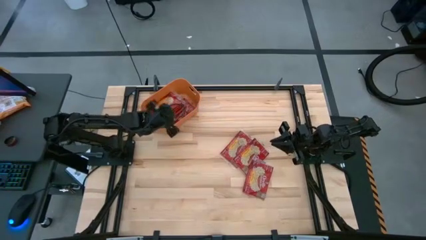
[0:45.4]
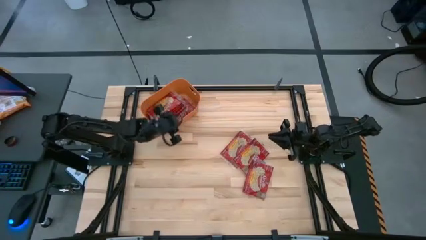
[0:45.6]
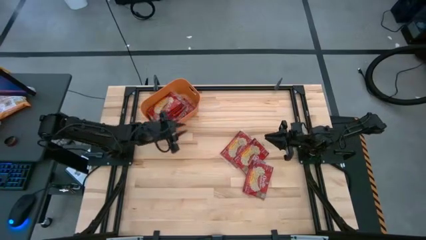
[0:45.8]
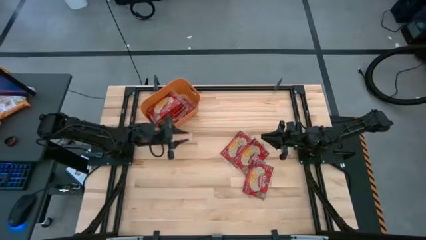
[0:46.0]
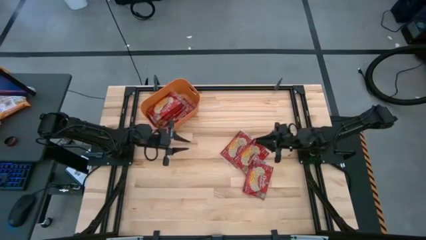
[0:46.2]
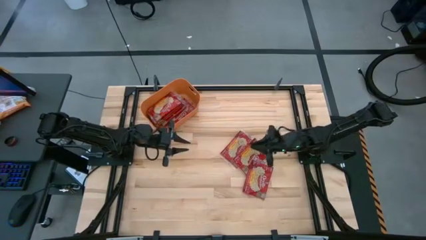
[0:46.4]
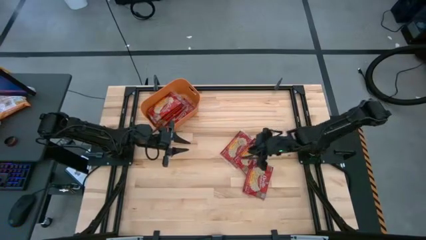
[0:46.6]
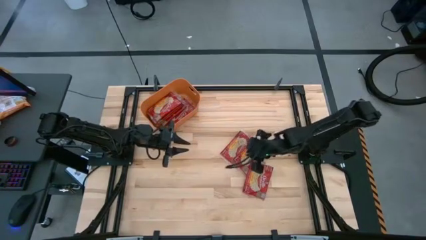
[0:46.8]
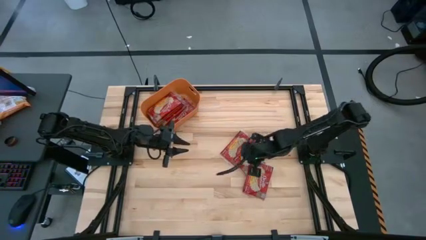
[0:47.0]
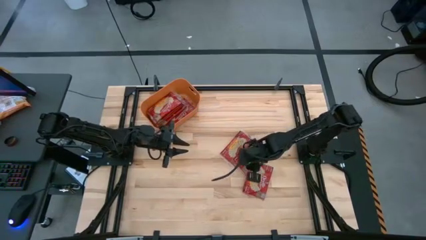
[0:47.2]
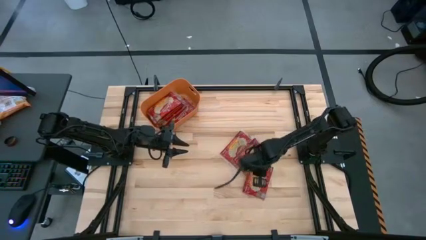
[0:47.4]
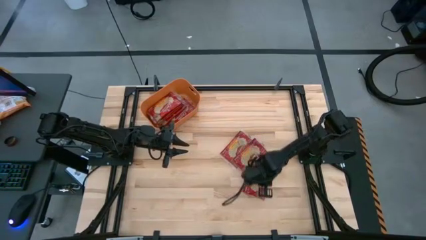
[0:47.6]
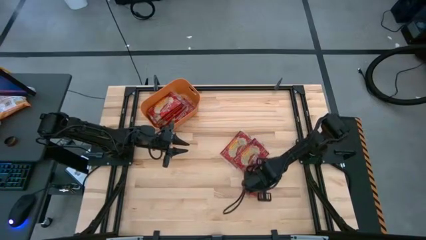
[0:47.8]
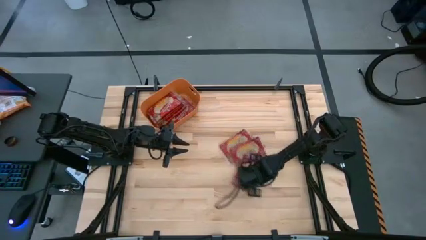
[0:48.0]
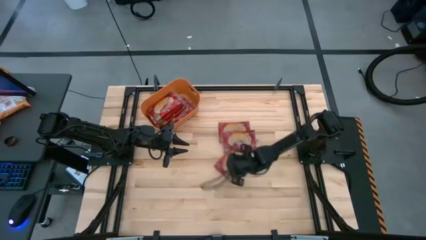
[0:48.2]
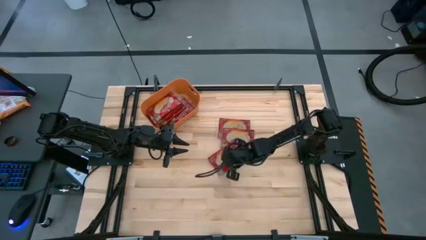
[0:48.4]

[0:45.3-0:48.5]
Task: Sort popcorn bags into baskets
Put the red popcorn pack into the orange bin

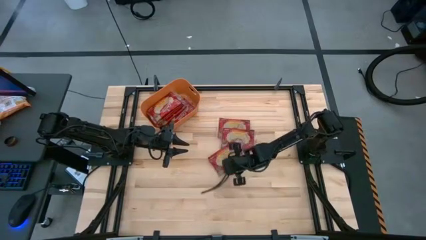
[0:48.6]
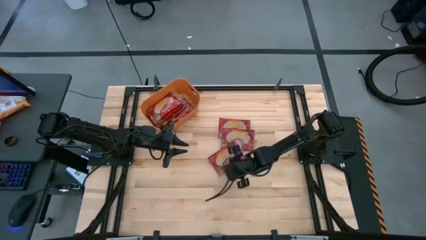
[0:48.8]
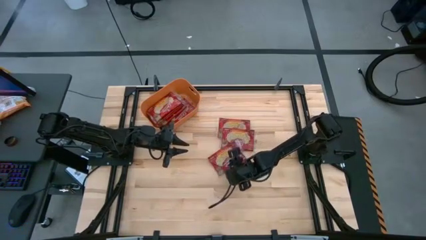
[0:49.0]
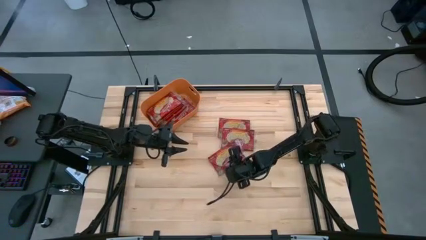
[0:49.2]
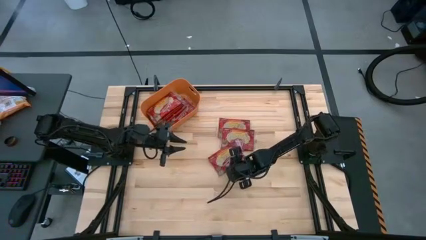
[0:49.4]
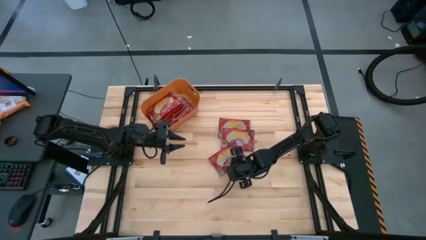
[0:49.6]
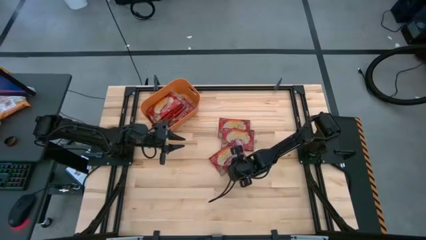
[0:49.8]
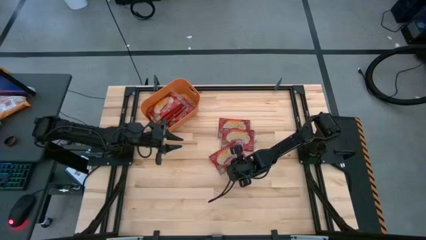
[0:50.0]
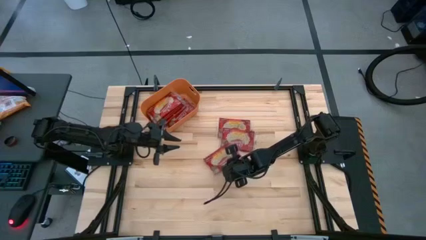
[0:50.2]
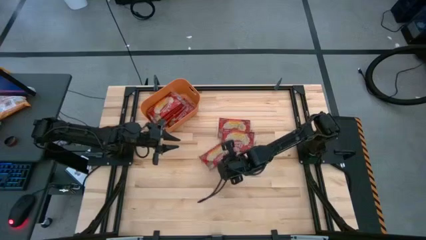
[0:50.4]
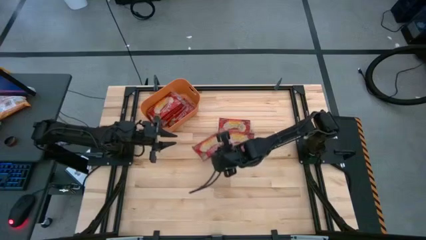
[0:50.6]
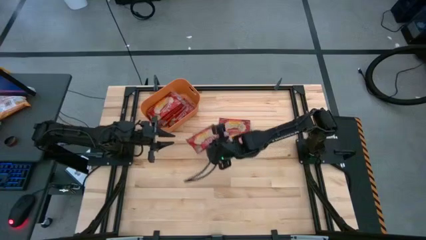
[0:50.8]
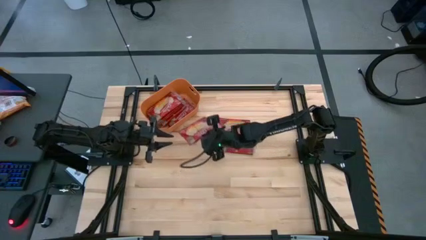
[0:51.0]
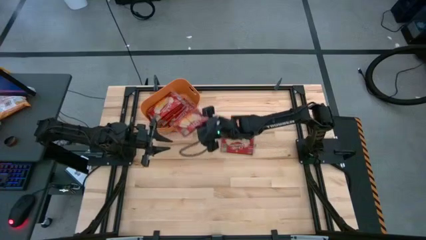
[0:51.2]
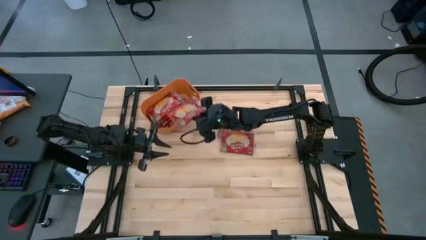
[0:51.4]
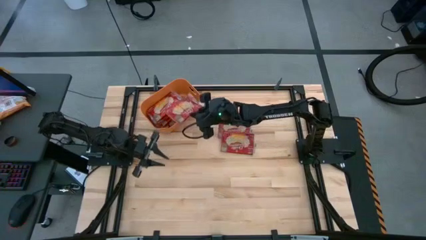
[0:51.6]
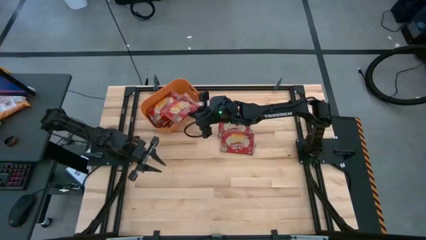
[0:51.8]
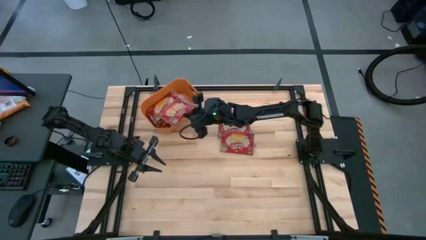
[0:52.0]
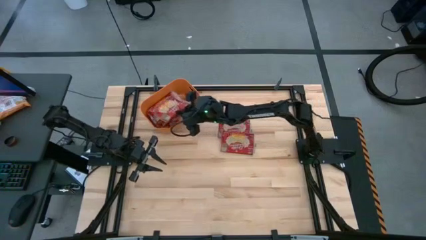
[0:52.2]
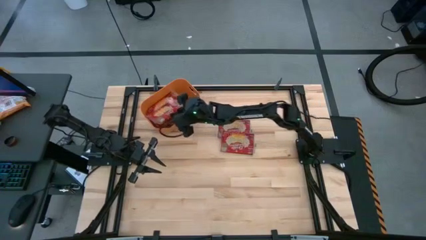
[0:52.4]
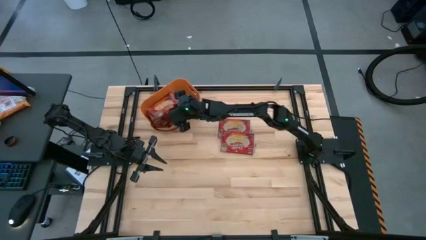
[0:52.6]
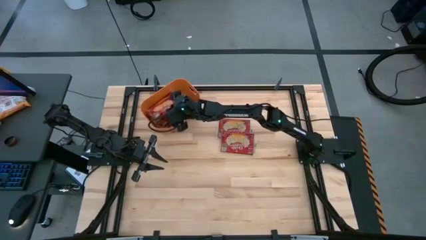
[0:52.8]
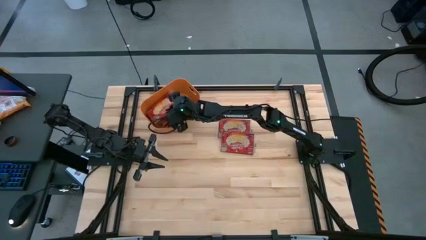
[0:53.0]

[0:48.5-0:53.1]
Put the red popcorn pack into the orange bin

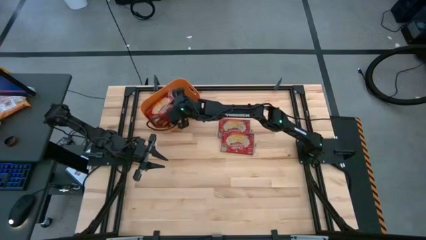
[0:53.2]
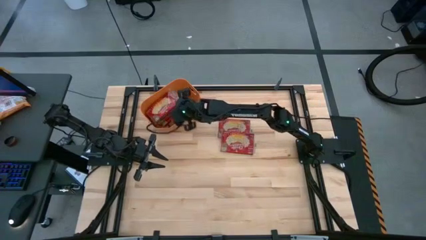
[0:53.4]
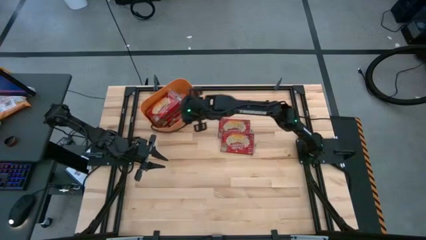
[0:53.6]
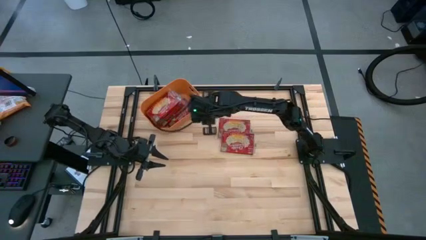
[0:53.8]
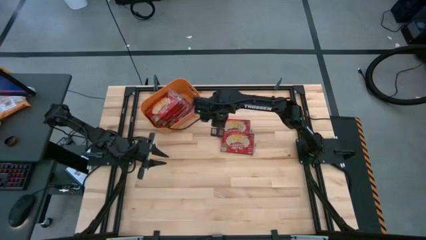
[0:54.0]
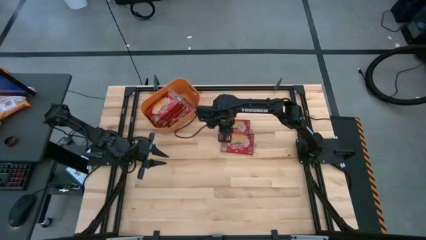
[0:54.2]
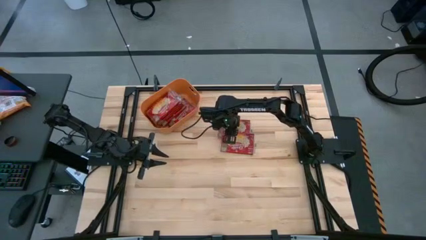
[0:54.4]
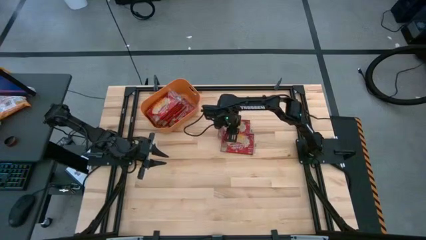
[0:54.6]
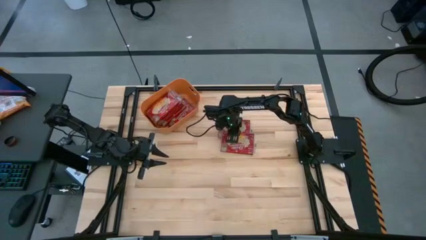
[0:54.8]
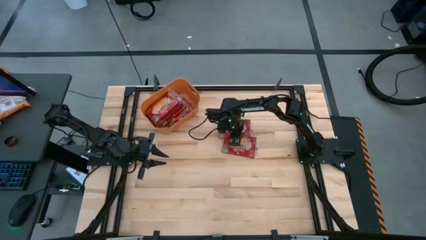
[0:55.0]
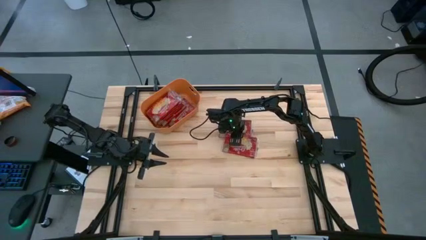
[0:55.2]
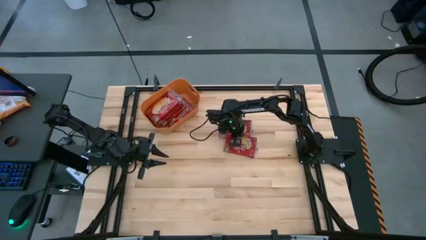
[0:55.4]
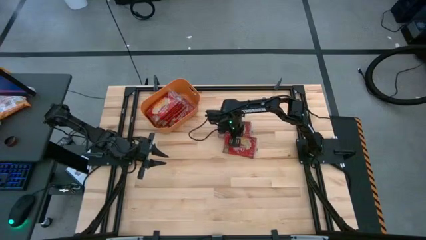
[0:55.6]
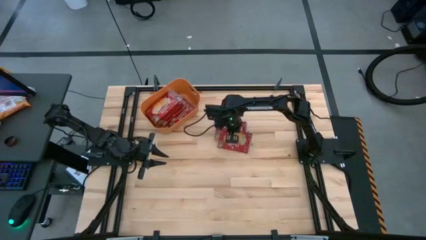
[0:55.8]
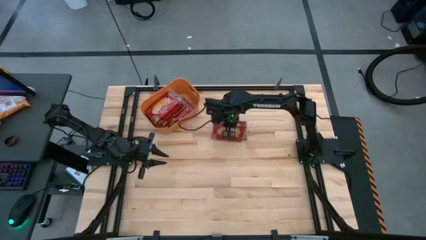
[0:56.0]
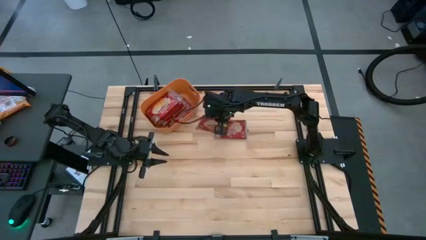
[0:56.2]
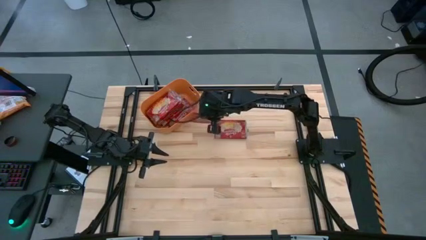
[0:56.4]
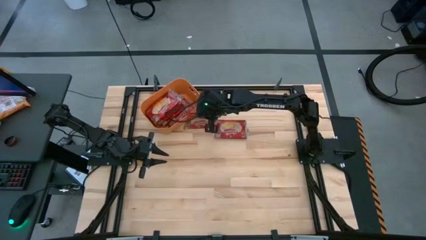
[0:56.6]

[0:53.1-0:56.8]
Put the red popcorn pack into the orange bin

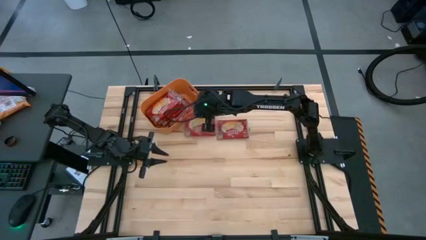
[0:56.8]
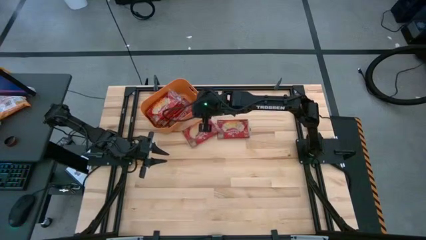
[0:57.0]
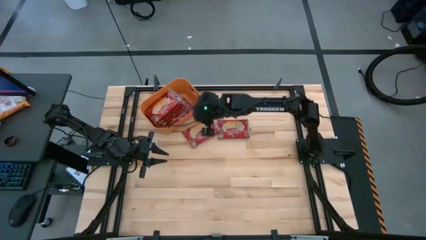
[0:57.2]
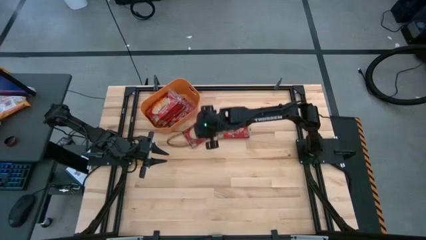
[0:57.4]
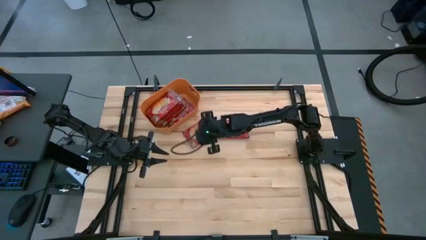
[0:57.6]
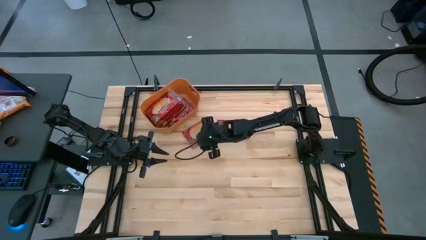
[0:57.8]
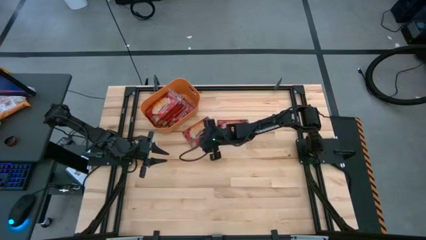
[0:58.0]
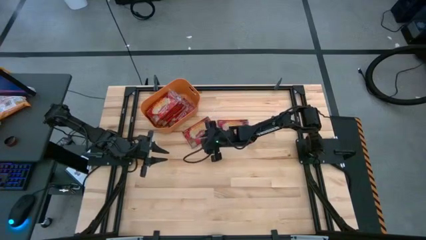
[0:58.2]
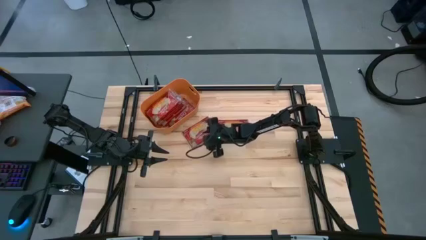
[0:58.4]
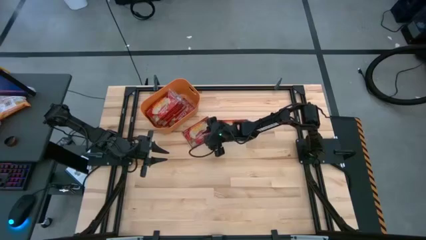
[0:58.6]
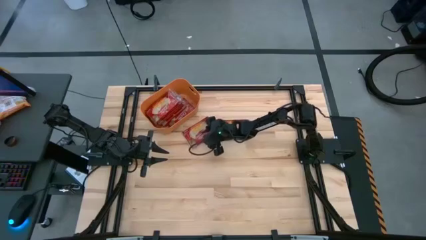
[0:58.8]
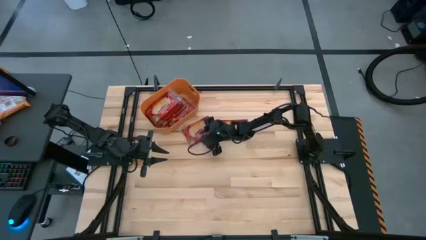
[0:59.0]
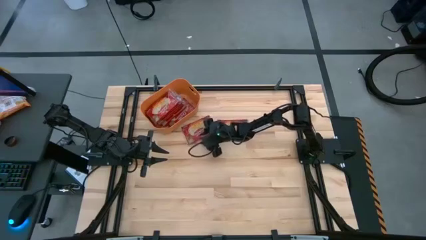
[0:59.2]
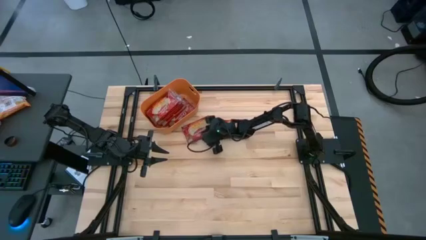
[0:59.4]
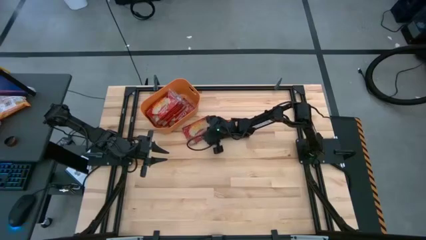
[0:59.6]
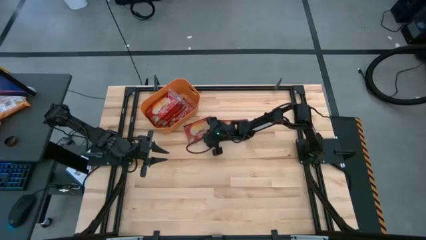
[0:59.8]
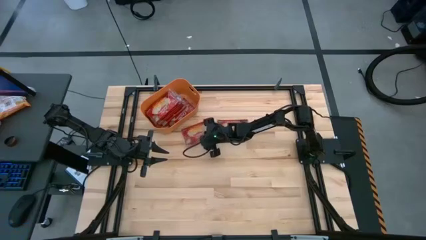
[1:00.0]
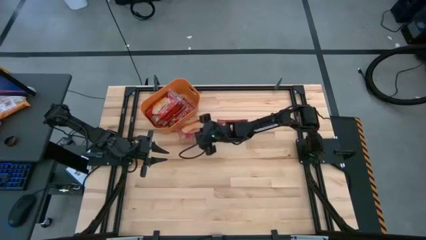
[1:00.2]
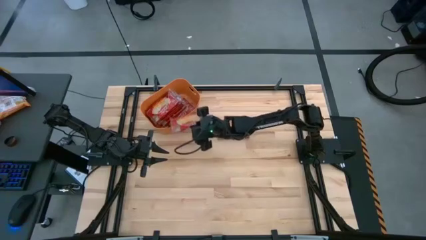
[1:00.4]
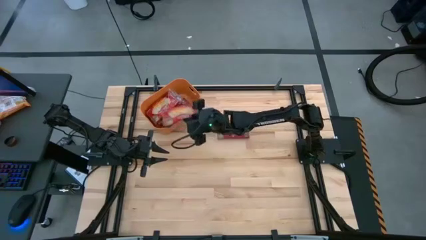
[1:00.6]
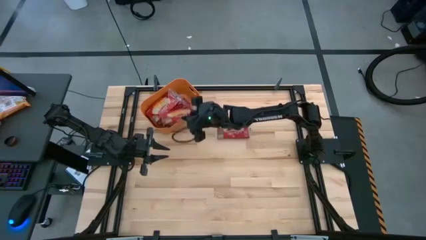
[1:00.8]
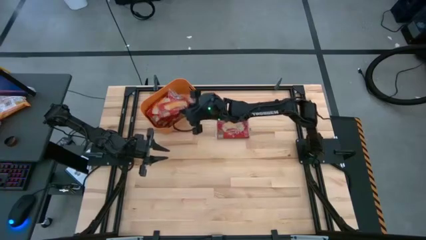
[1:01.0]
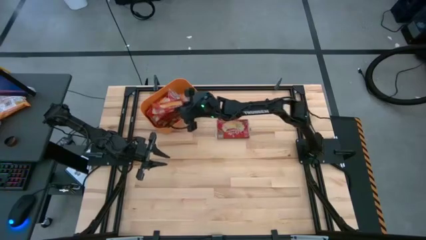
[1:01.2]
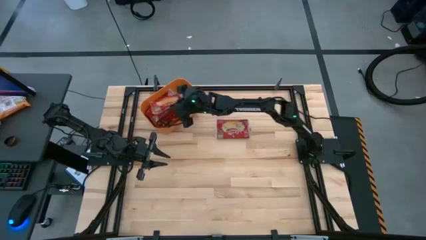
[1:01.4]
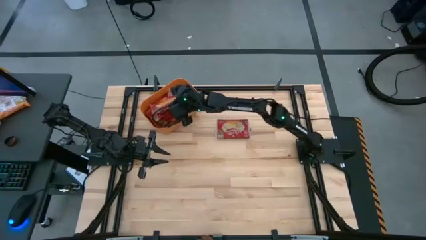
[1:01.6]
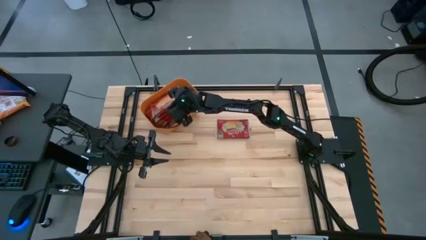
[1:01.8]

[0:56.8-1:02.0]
Put the red popcorn pack into the orange bin

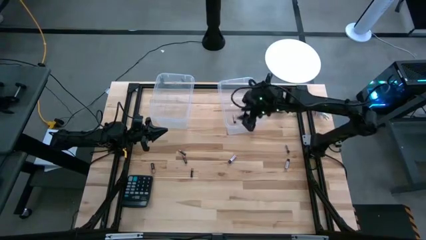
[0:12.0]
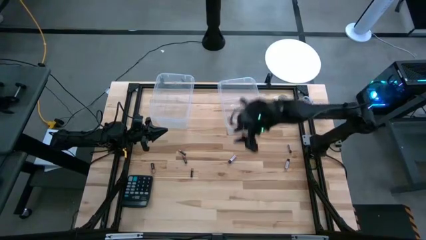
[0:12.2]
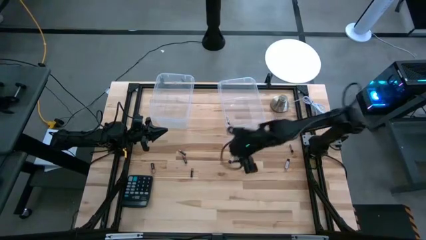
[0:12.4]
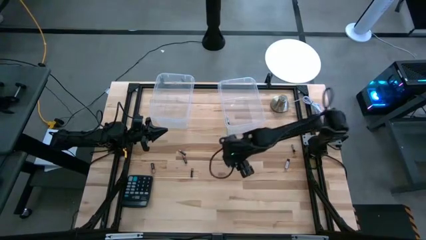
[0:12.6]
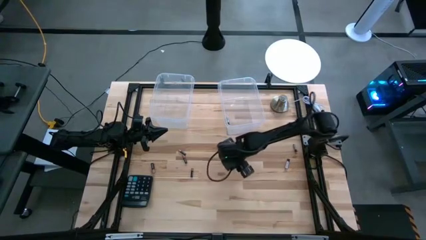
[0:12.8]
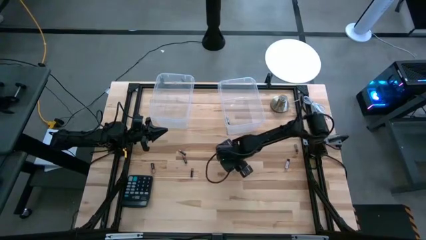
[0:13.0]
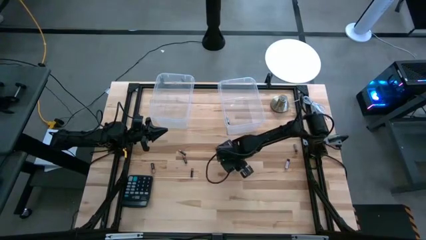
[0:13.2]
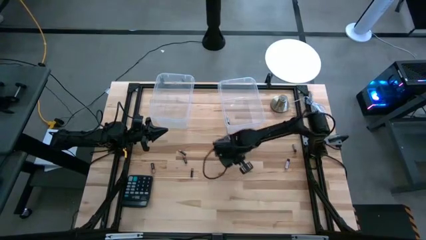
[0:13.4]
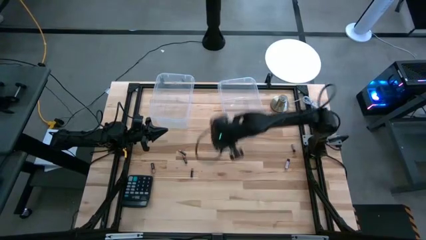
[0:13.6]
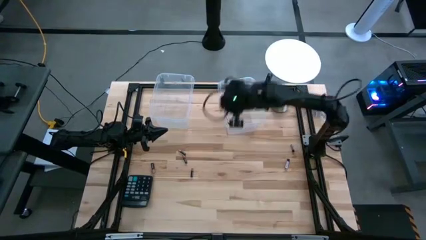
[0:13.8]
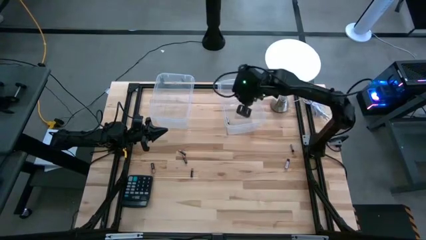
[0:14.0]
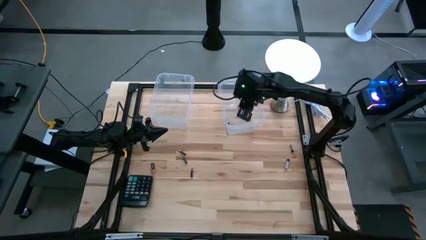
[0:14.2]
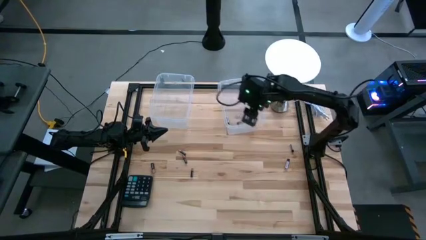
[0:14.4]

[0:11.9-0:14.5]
Task: Sort batteries
Put the silver battery into the right transparent bin
